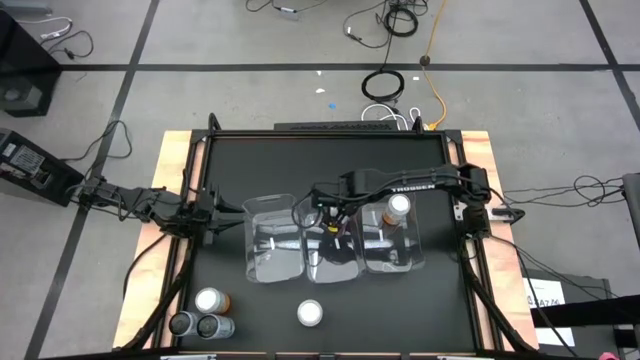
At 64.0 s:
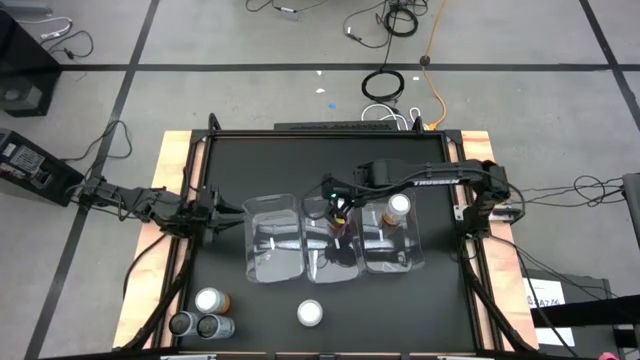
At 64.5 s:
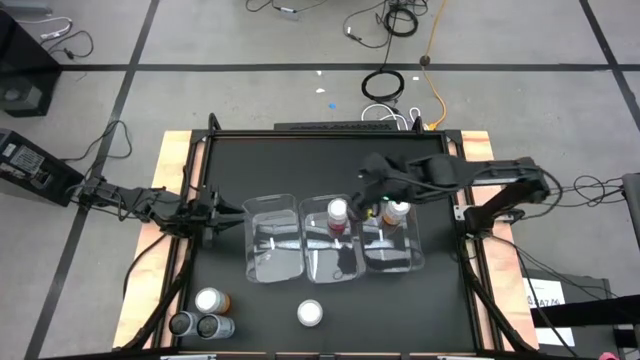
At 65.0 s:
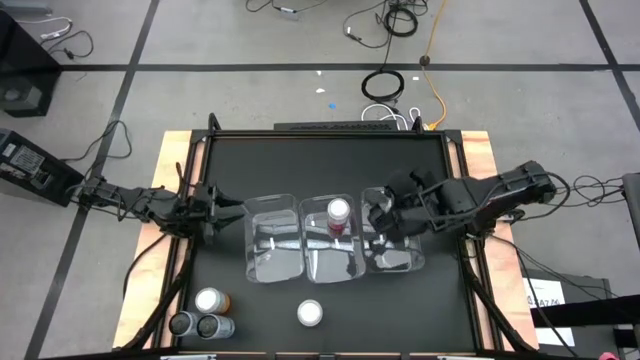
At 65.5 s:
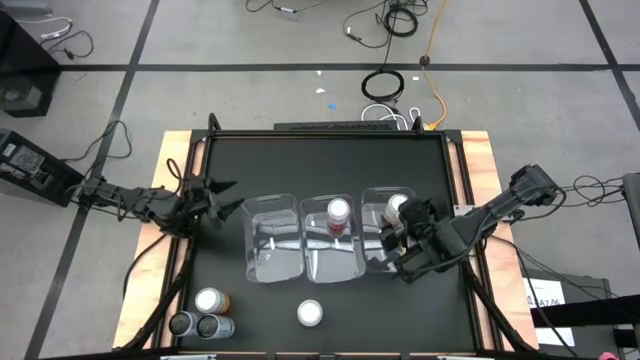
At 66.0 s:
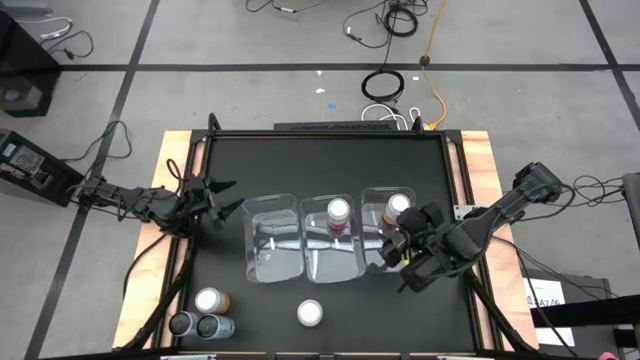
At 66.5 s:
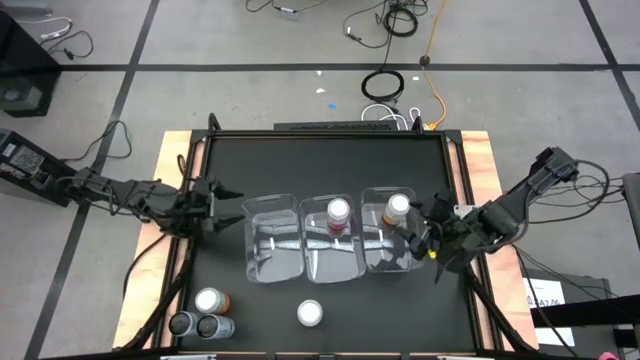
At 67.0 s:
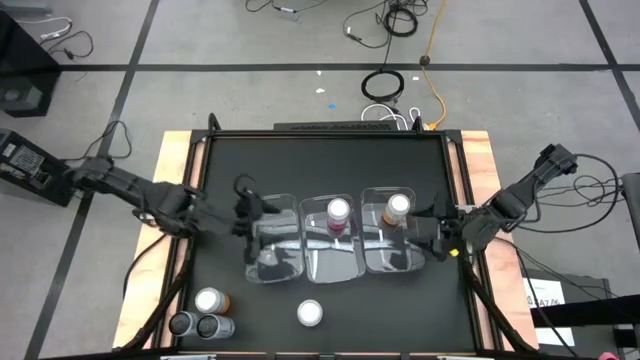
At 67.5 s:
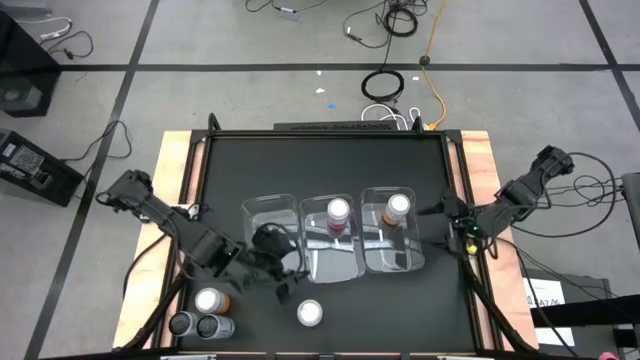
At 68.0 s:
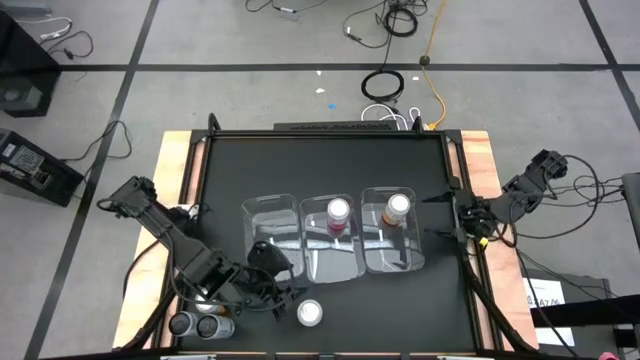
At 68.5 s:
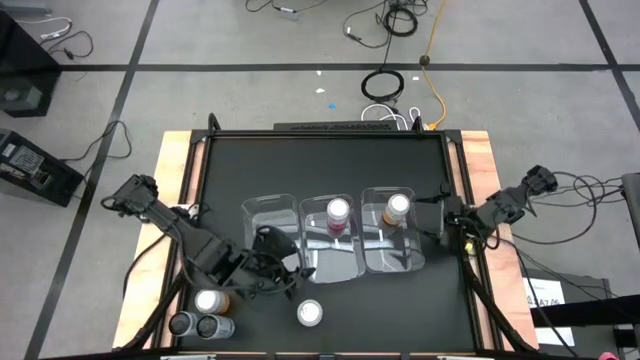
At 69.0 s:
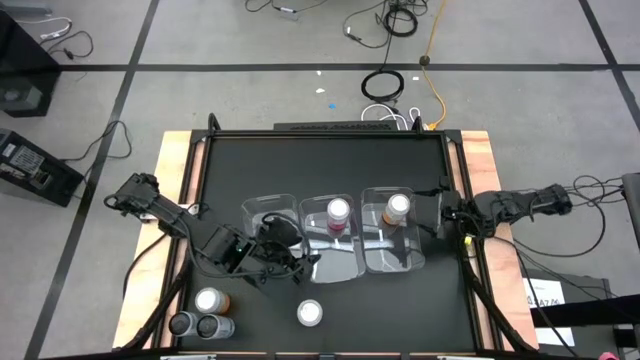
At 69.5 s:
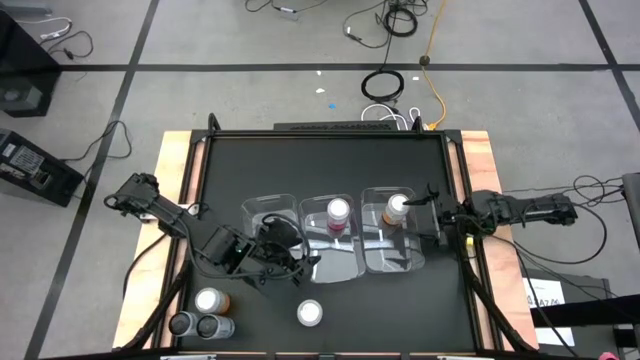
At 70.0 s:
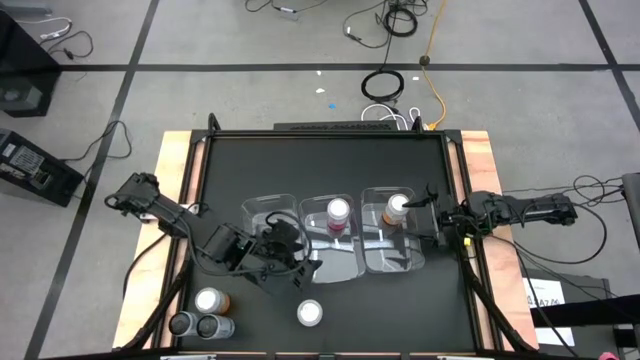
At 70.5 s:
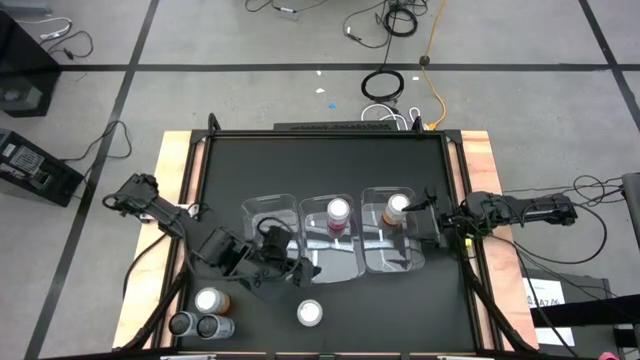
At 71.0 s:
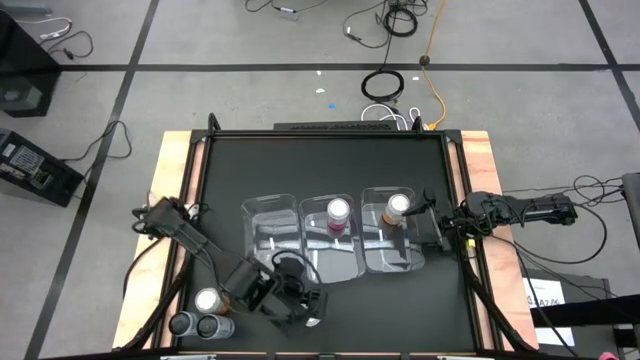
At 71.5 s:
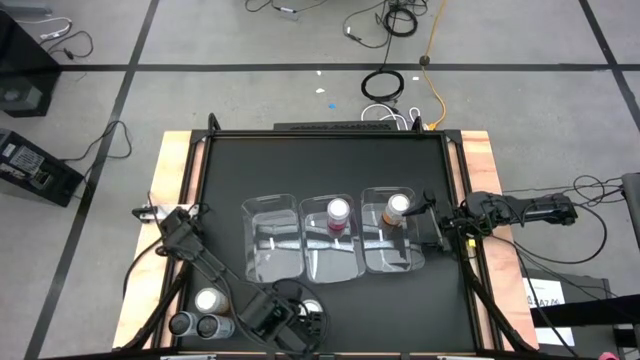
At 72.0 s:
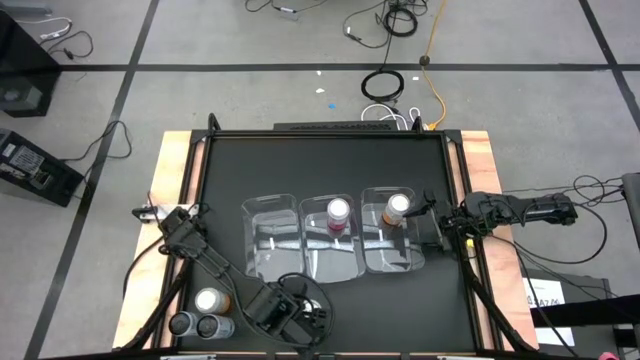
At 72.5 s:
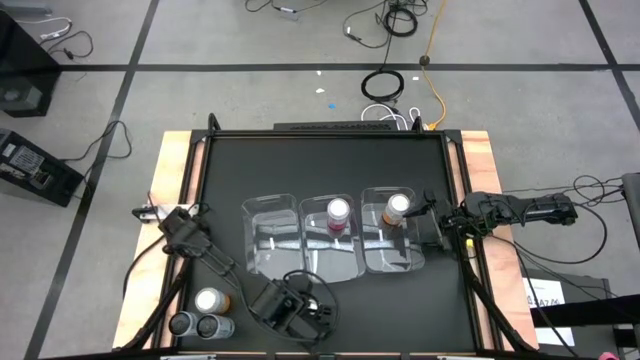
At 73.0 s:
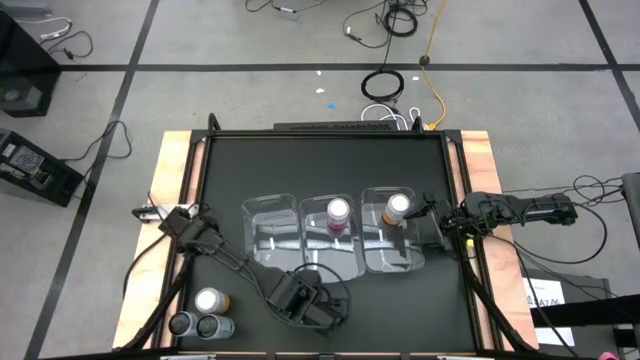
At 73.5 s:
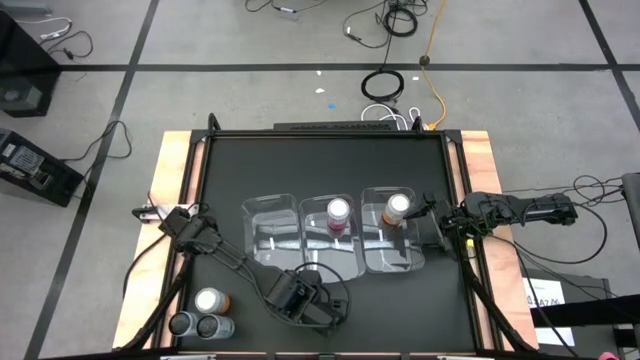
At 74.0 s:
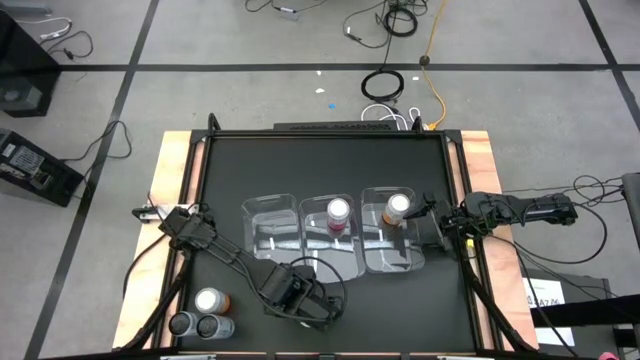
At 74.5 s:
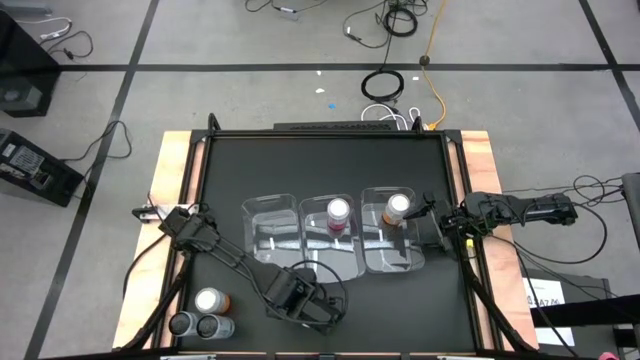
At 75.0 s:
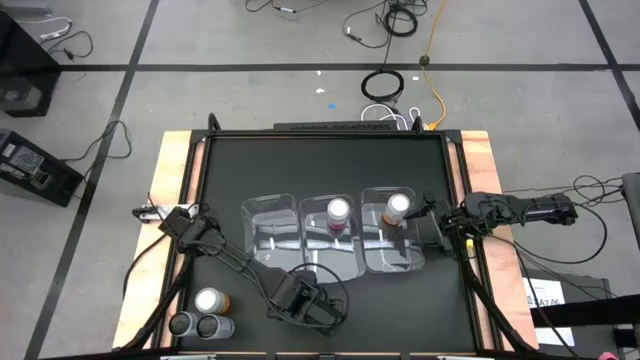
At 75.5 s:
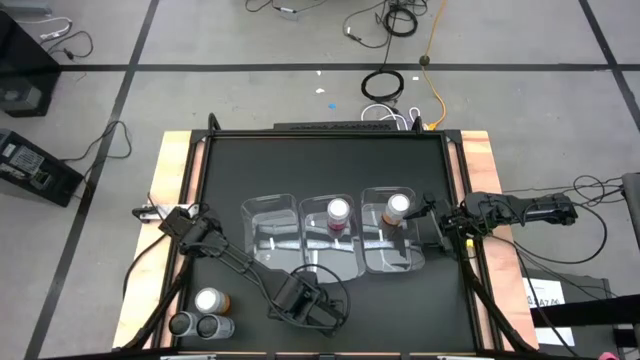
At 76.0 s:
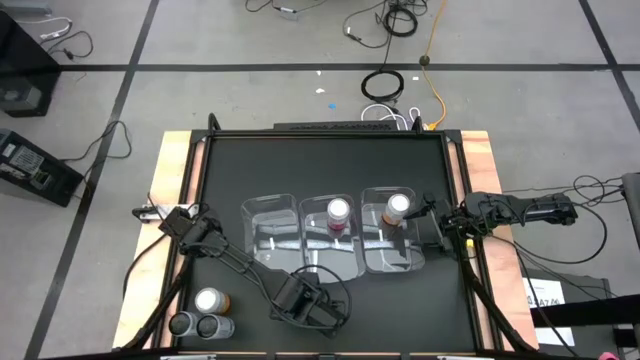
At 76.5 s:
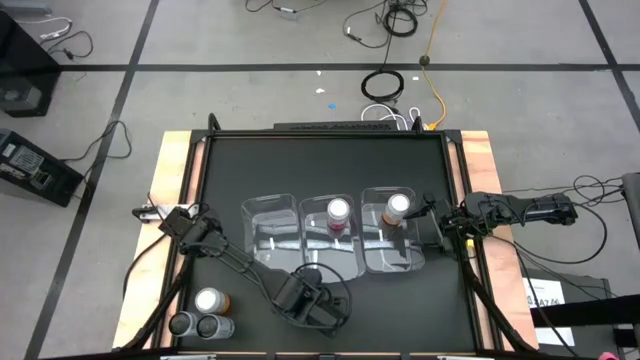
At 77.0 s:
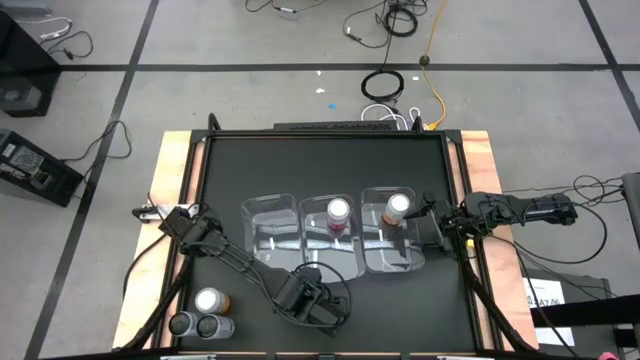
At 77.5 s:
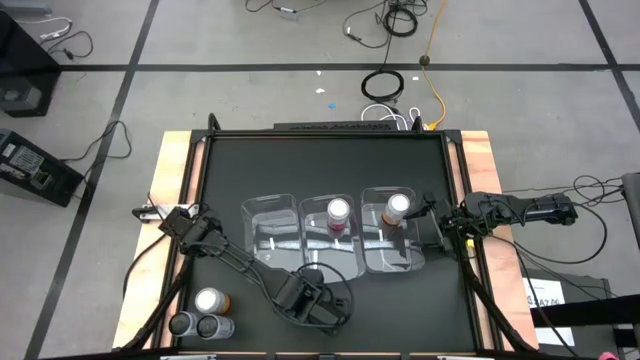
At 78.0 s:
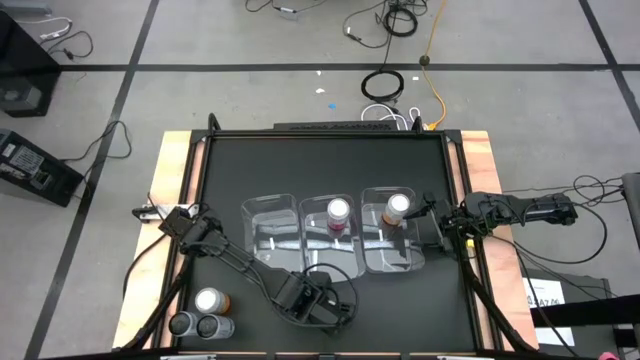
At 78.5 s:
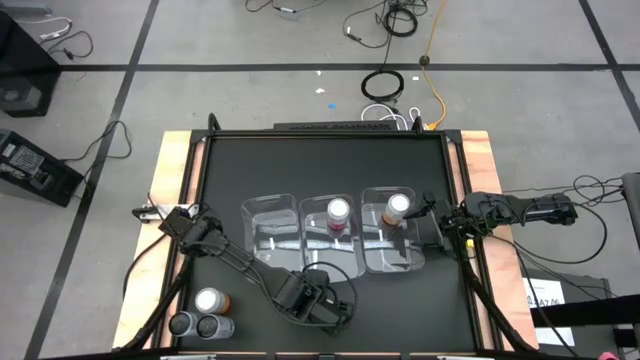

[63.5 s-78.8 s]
Task: Sort soda cans
Put the pink soda can into the middle transparent bin

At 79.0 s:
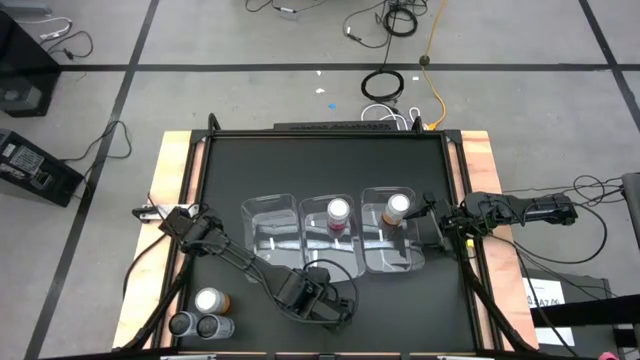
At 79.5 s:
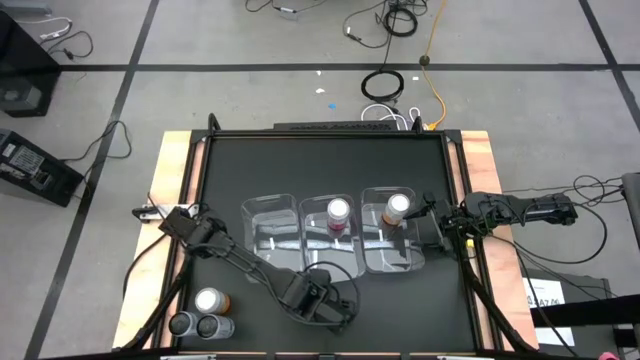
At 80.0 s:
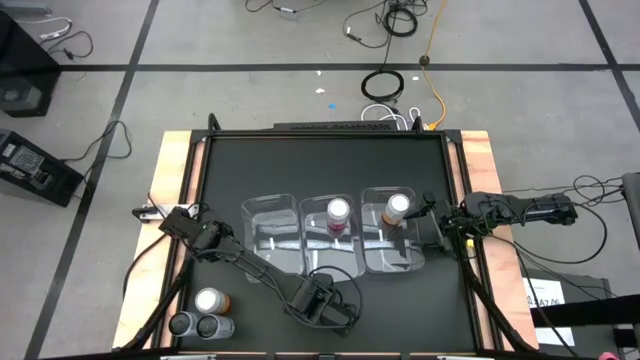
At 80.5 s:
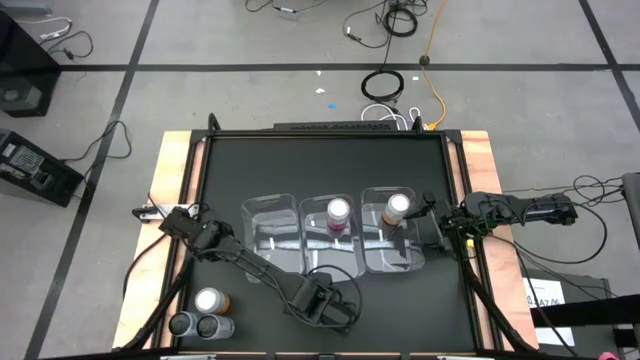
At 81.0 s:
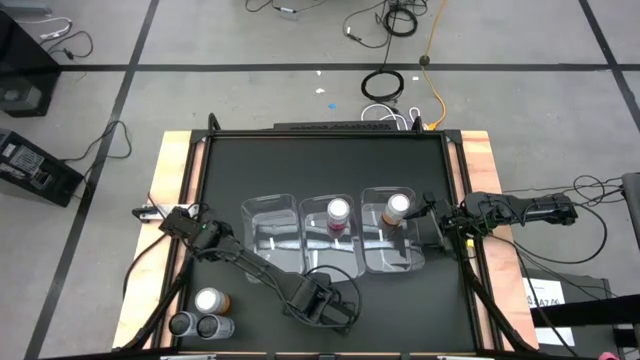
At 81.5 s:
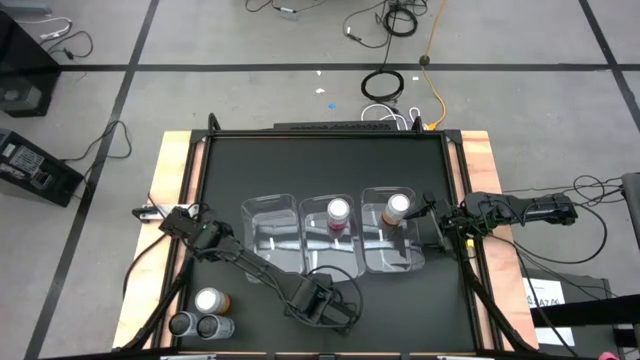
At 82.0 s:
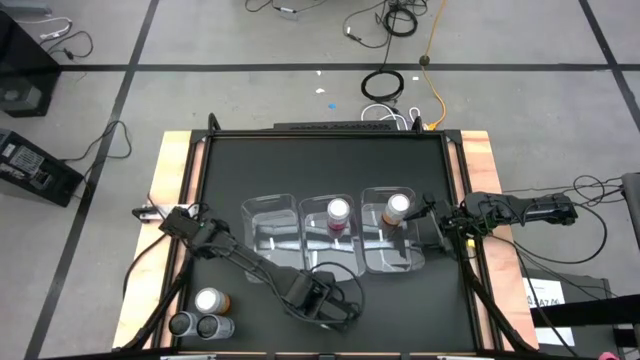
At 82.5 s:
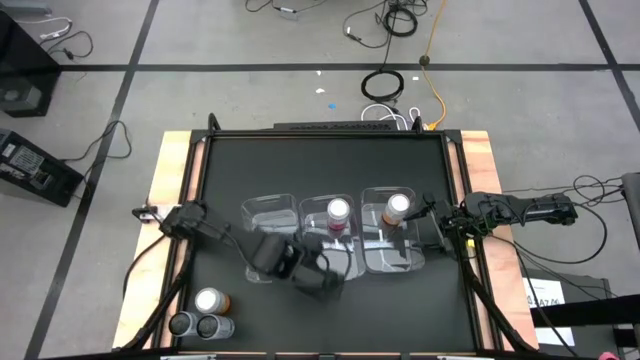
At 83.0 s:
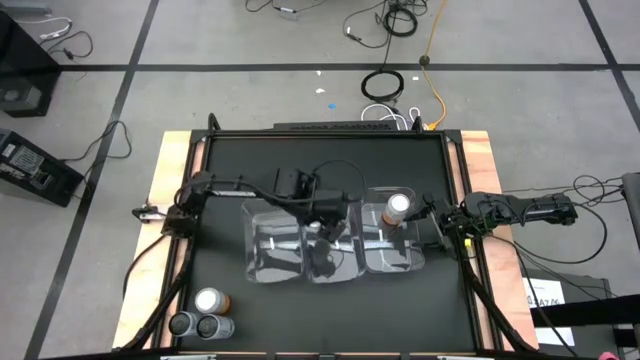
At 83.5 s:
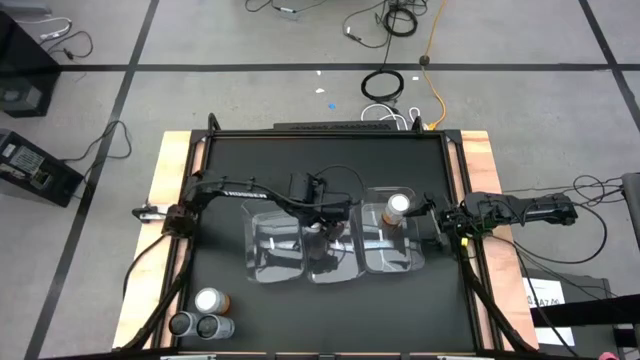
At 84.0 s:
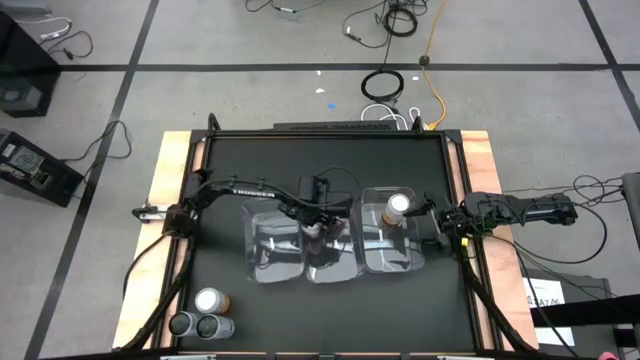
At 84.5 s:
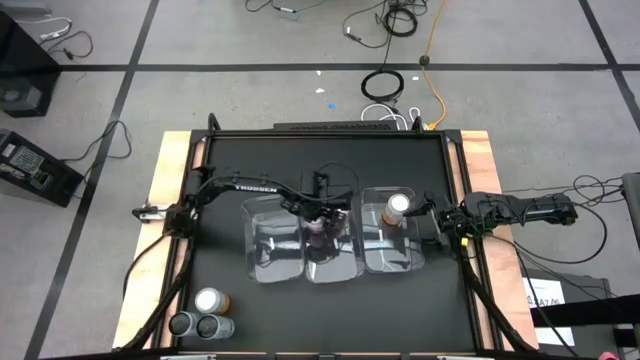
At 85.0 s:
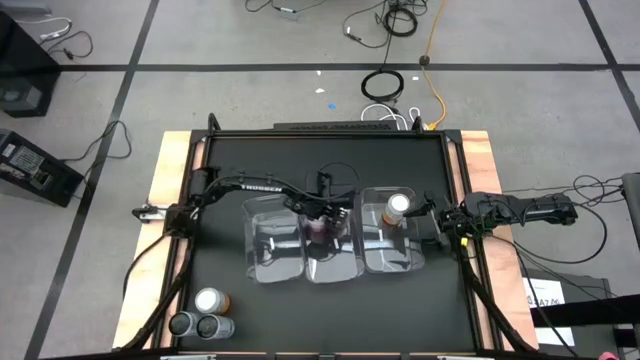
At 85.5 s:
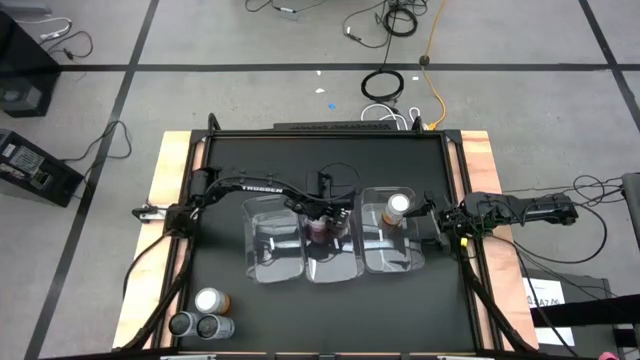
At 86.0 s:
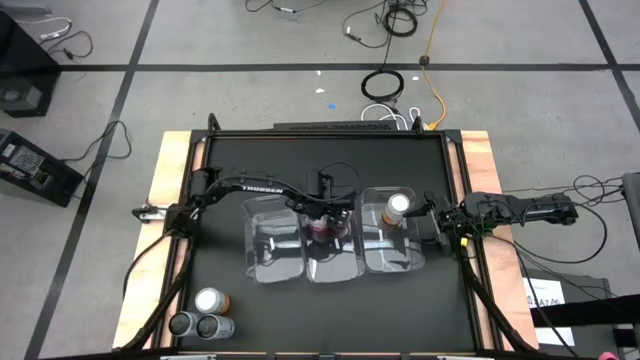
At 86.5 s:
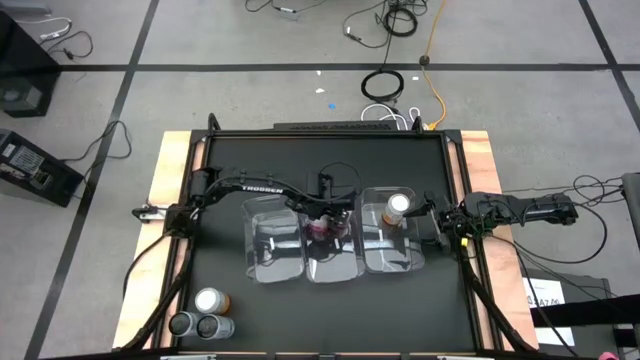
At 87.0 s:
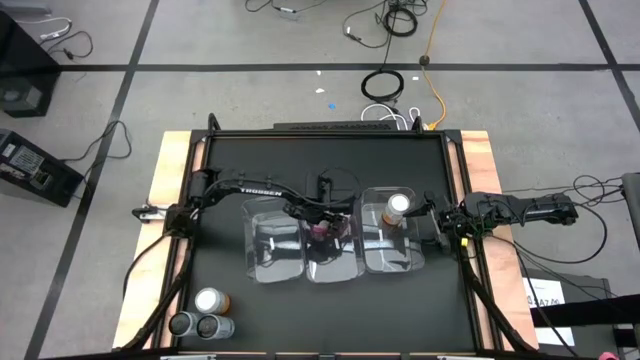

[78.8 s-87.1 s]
Put the pink soda can into the middle transparent bin
